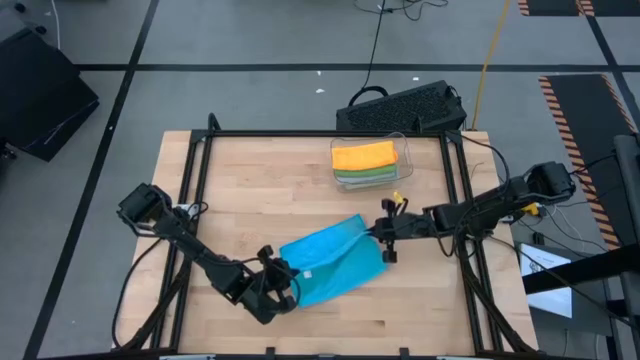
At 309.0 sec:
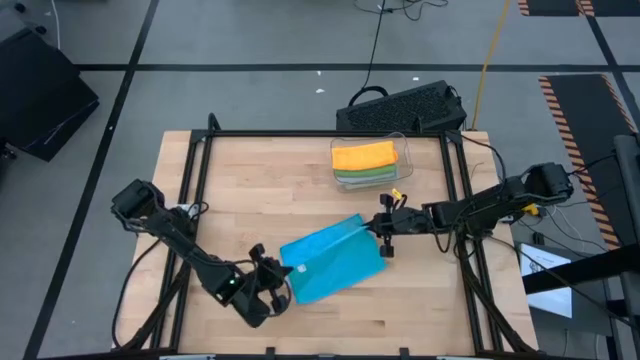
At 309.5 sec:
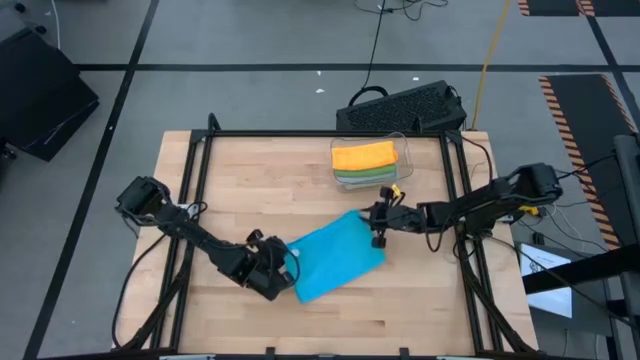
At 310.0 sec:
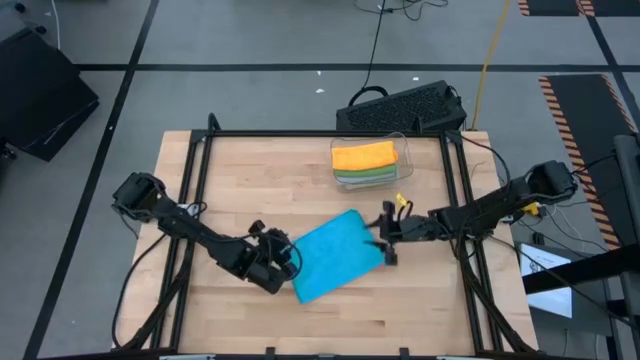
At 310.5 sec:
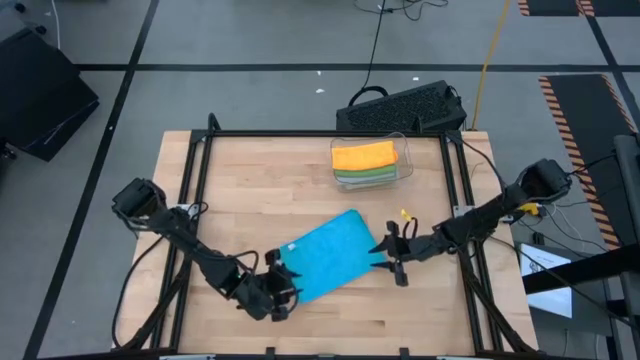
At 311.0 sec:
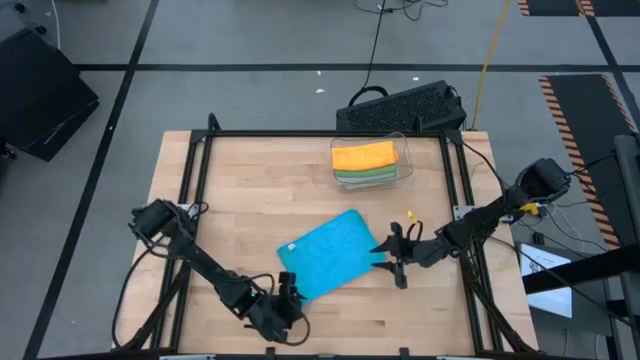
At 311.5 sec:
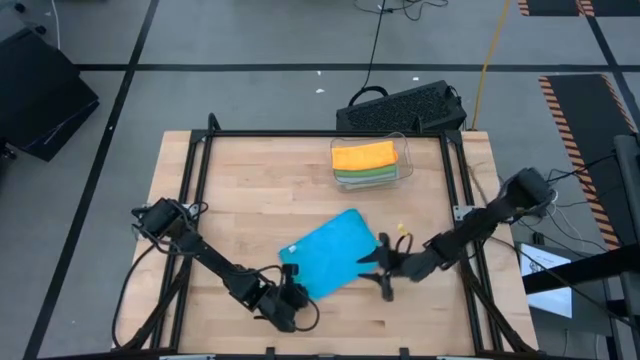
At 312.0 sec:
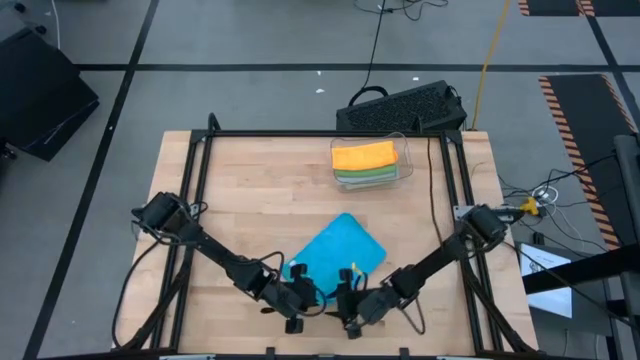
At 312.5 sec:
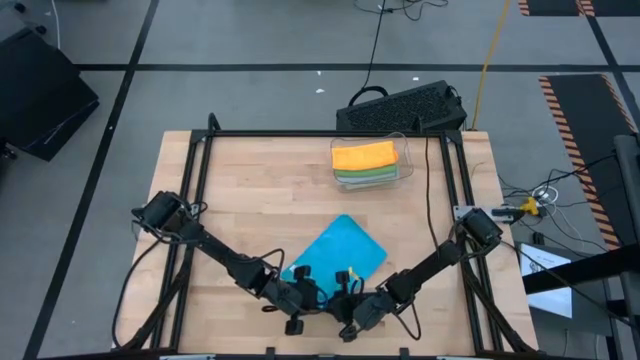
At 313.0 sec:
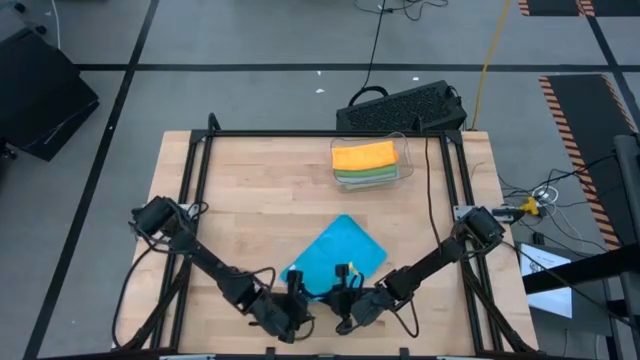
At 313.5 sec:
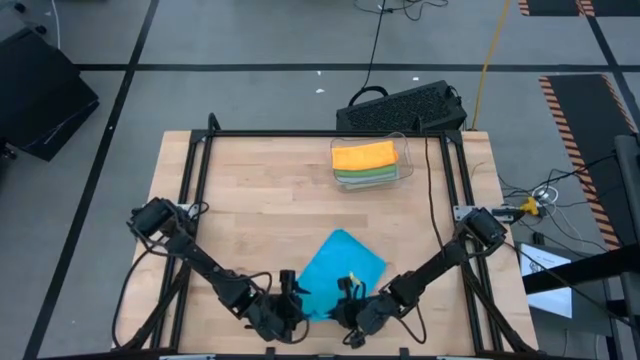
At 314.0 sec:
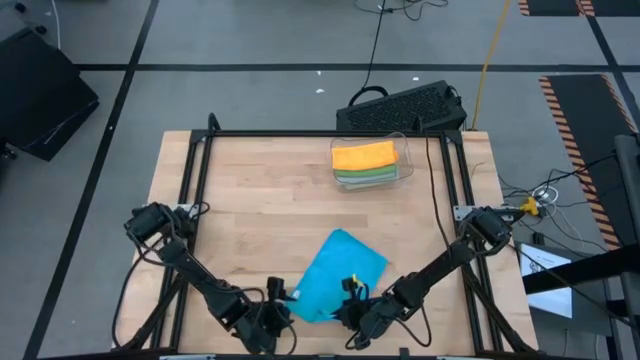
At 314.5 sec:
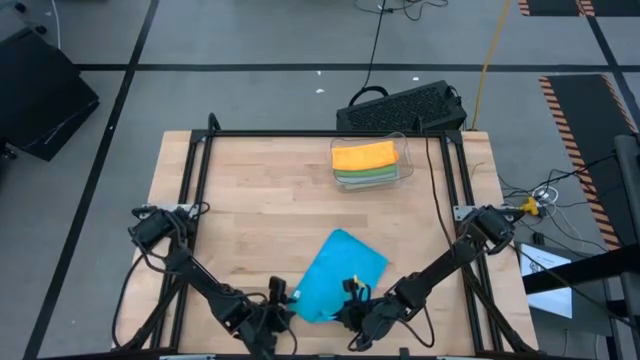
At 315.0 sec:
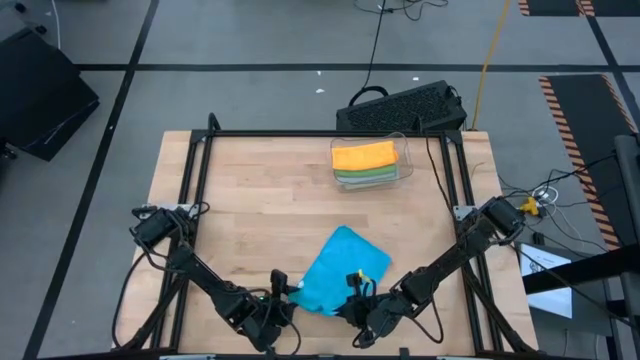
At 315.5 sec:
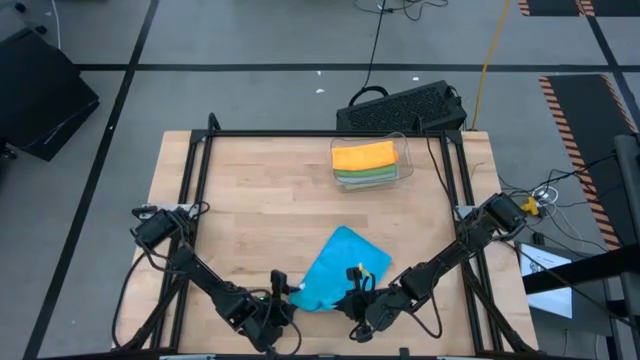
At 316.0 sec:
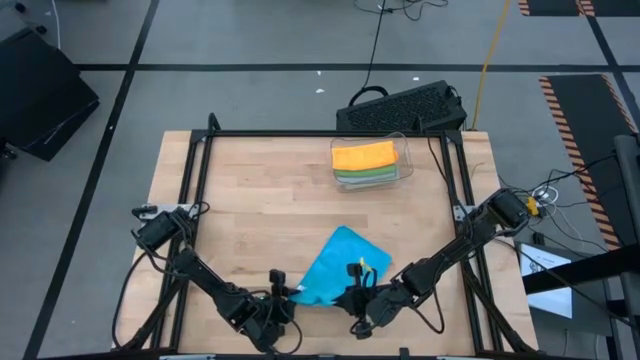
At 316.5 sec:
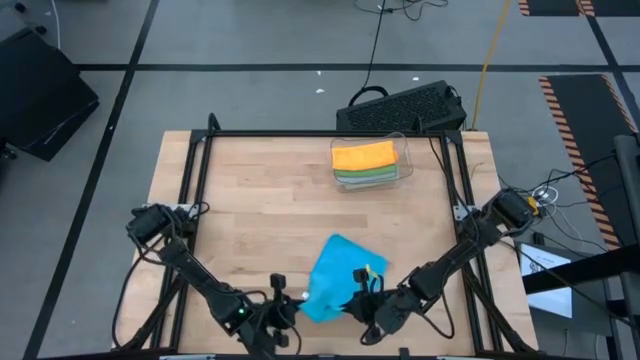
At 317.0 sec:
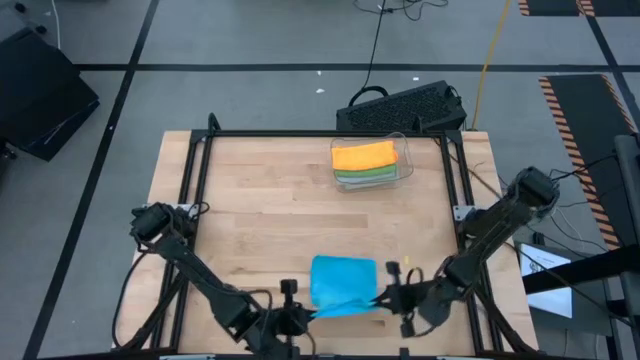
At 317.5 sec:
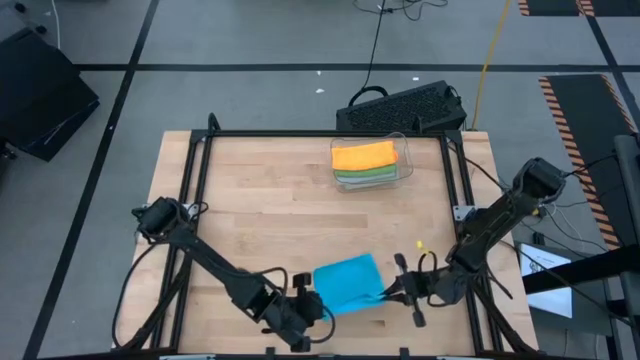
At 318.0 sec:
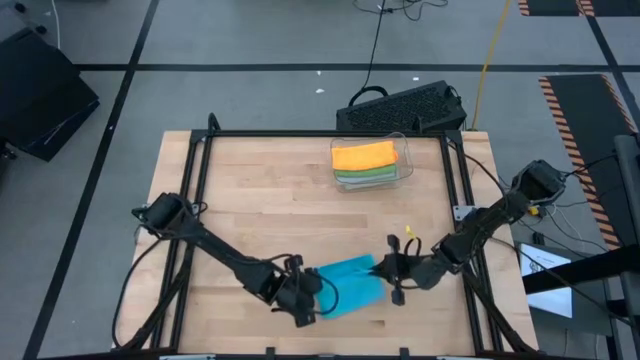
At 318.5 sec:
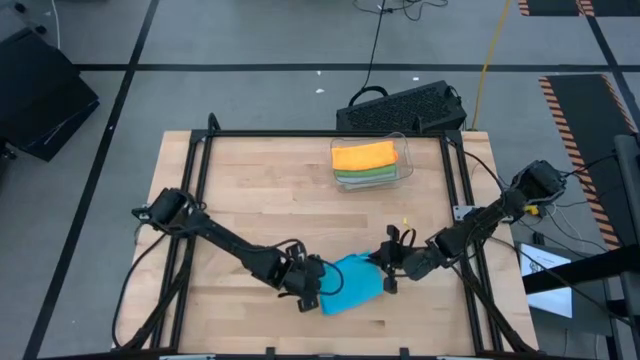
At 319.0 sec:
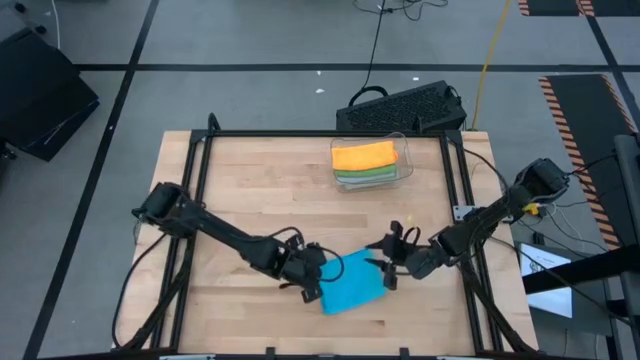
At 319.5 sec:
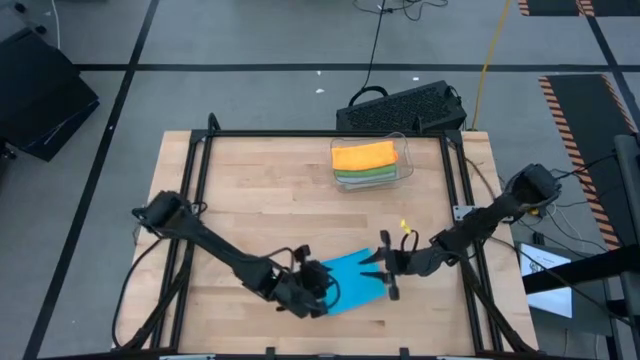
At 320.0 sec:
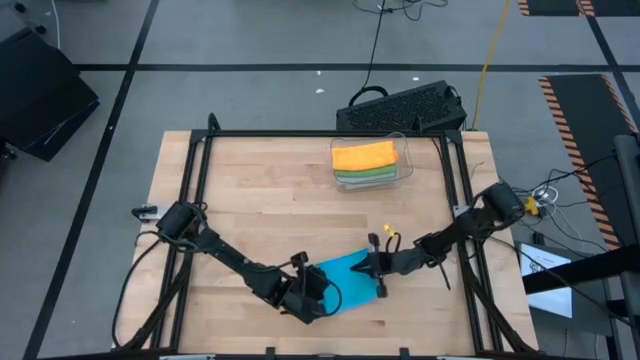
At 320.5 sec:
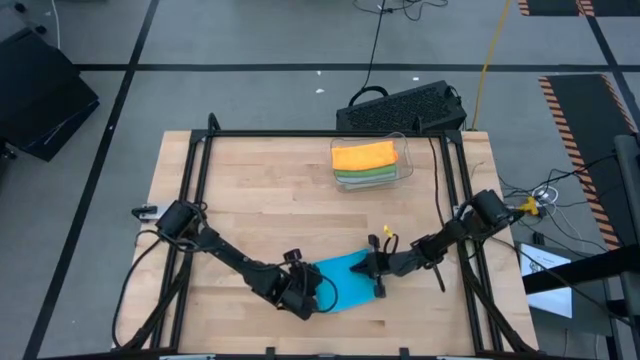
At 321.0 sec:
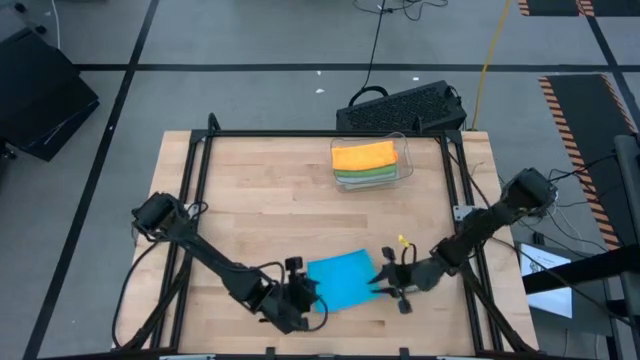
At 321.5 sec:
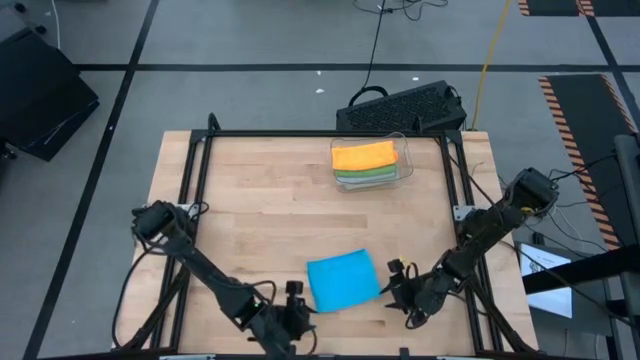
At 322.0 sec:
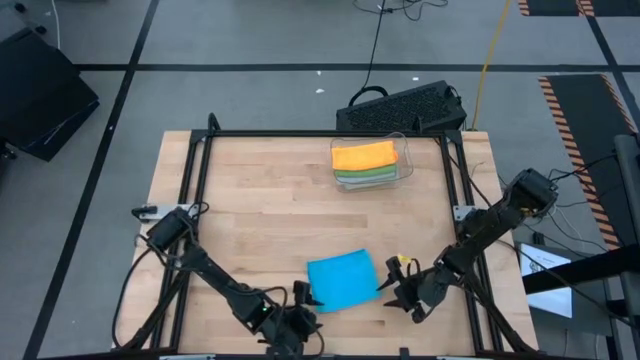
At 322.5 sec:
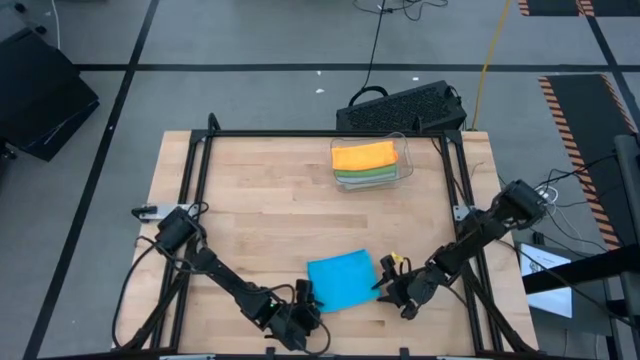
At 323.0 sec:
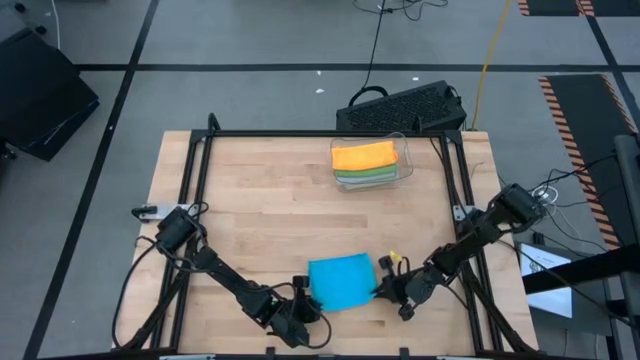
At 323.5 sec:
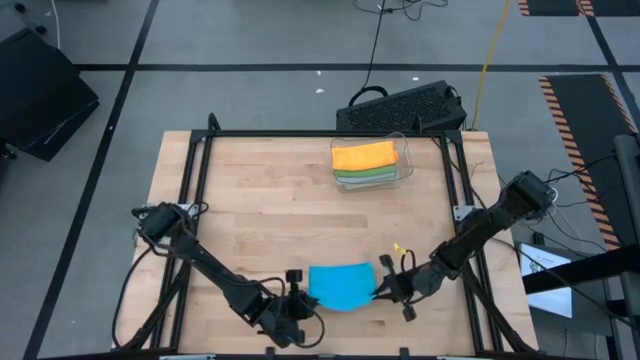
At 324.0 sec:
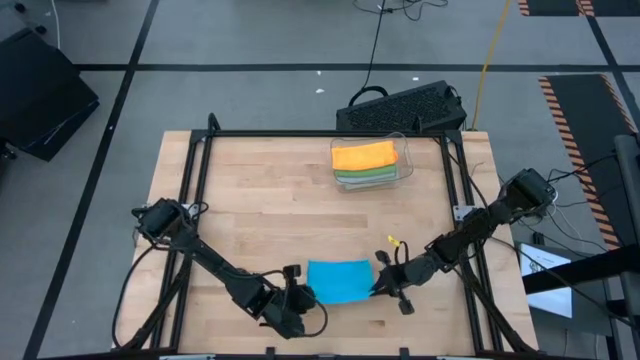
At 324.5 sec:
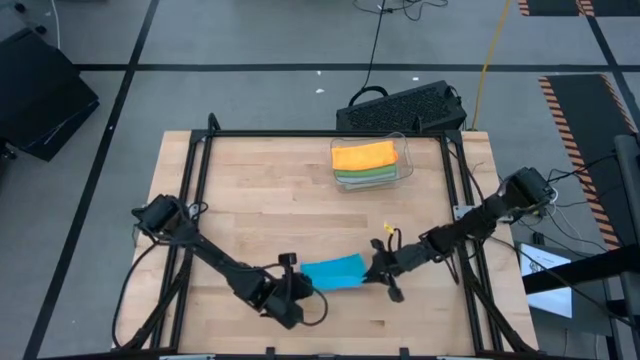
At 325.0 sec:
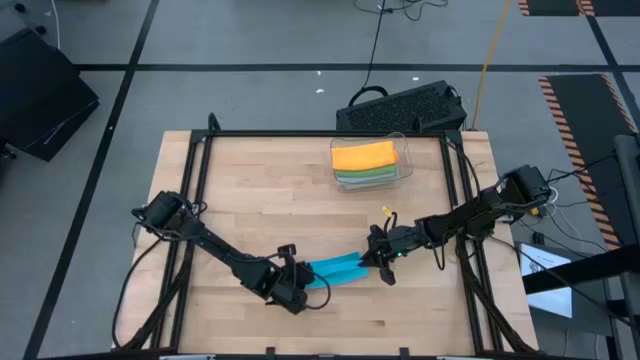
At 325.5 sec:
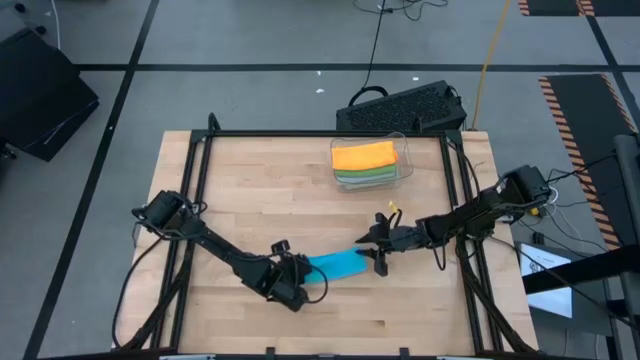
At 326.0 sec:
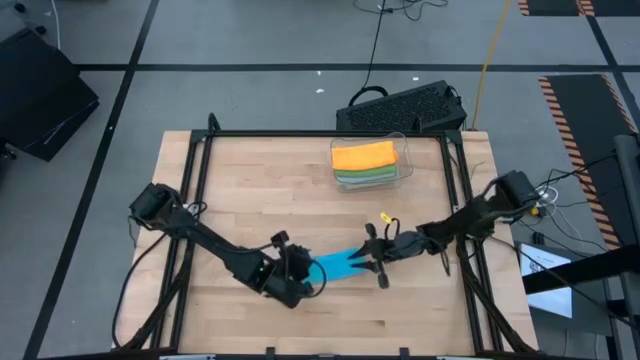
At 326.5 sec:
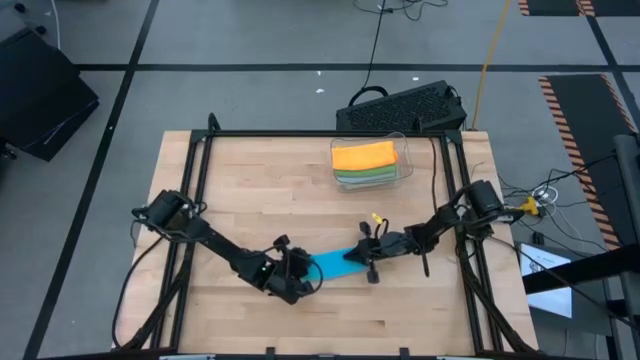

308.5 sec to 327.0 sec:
Task: Fold microfiber towels
Fold the blue microfiber towel

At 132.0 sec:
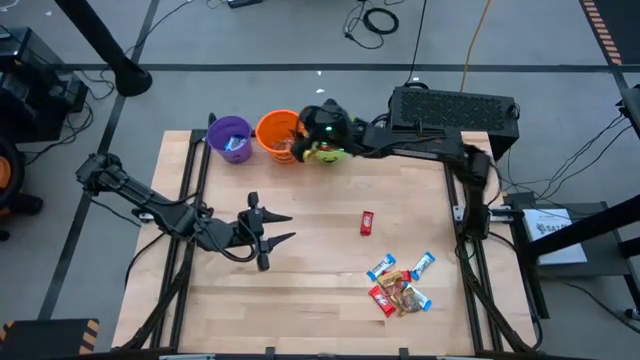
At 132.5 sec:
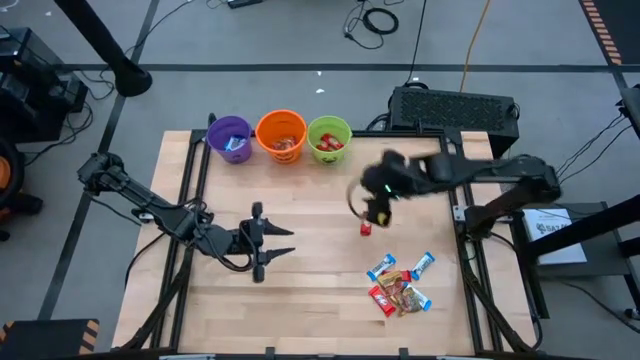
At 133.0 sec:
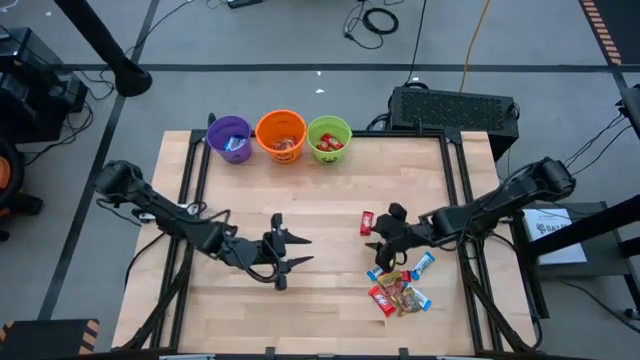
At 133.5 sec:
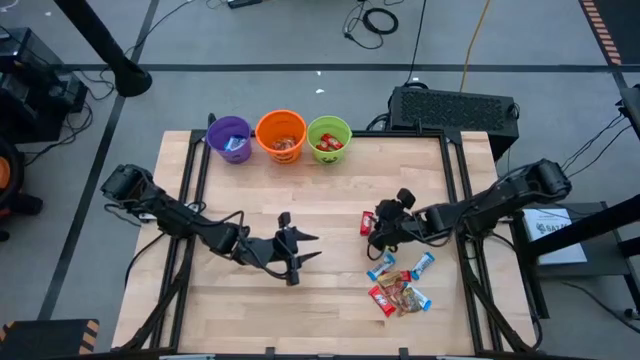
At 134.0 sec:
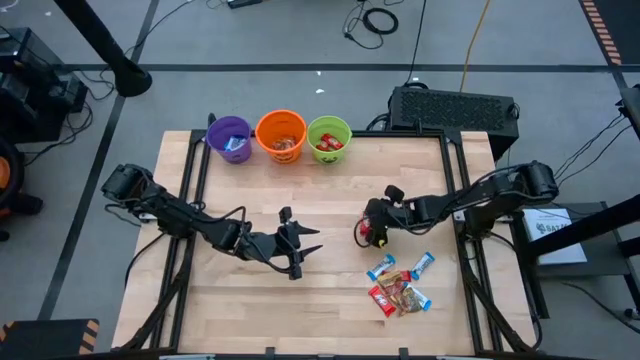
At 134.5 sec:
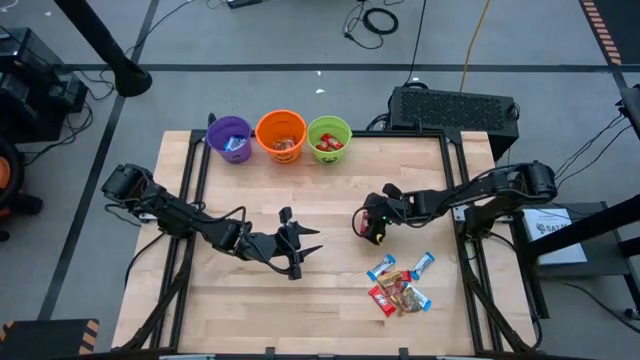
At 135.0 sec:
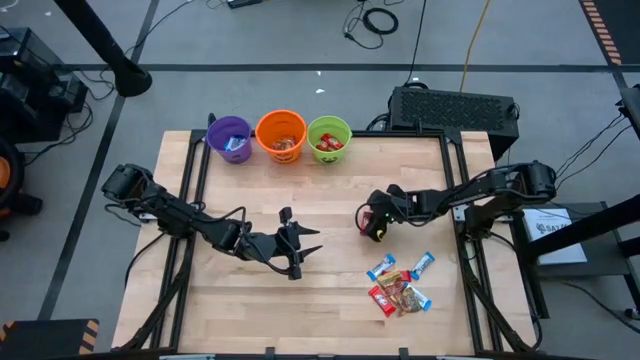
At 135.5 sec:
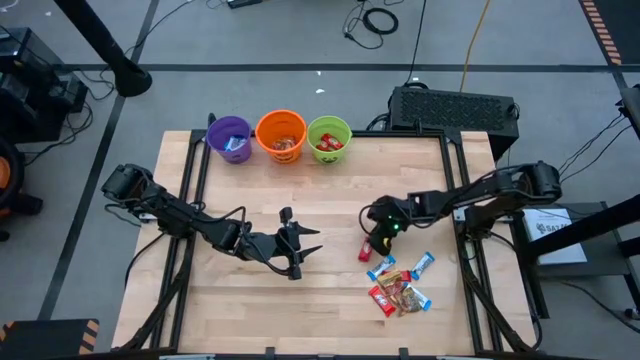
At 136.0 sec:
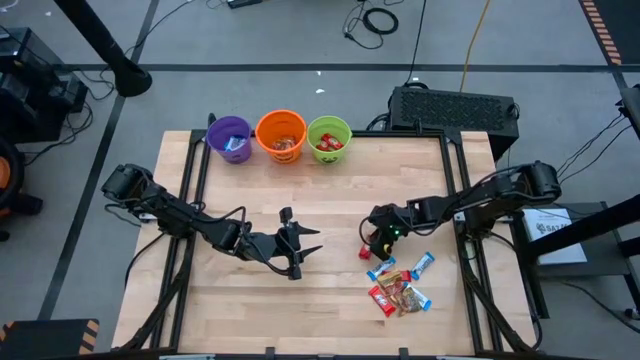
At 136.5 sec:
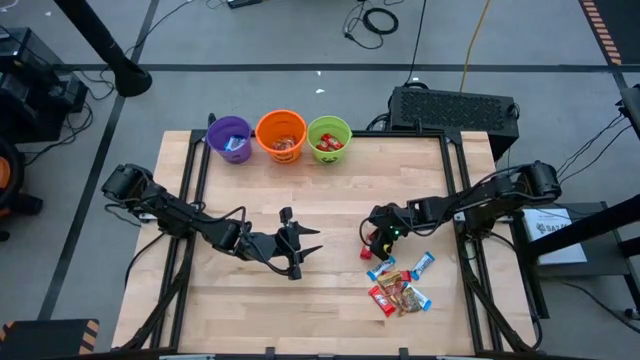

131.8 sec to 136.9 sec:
Task: Sort candy by brand, put in halloween buckets
Put the red chocolate bar into the green bucket
